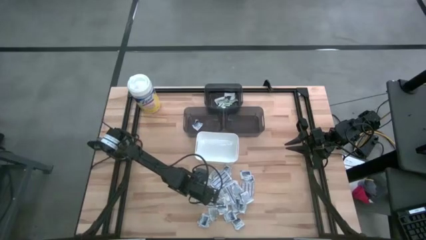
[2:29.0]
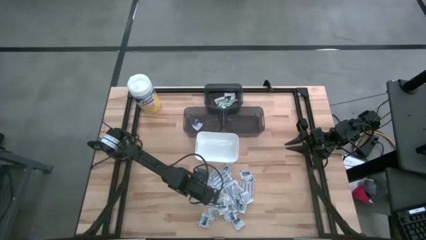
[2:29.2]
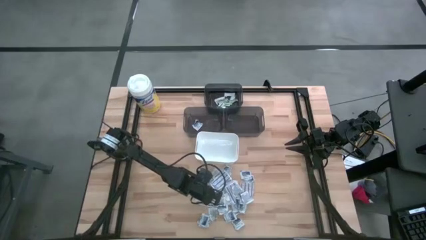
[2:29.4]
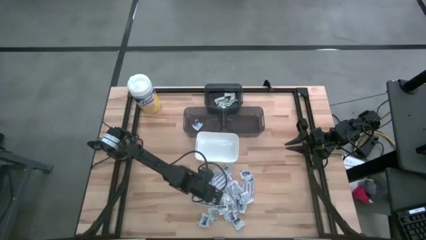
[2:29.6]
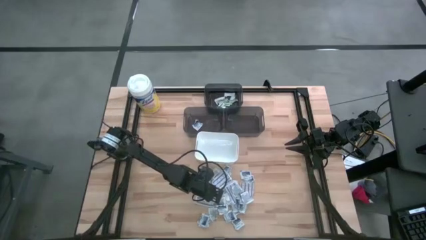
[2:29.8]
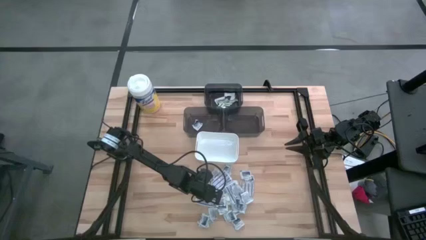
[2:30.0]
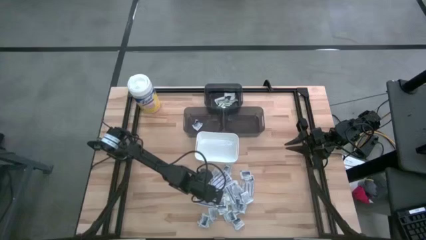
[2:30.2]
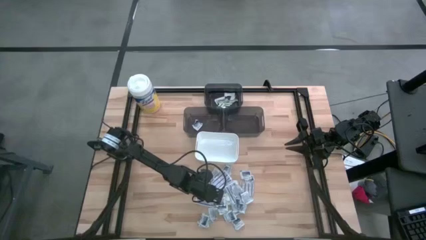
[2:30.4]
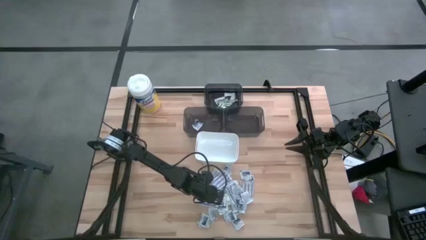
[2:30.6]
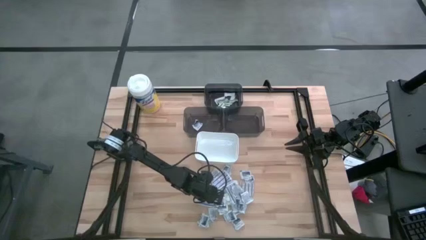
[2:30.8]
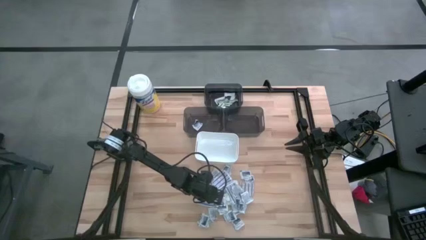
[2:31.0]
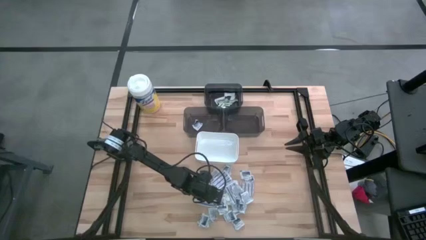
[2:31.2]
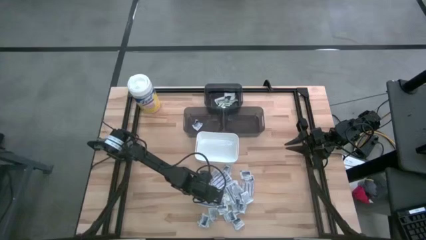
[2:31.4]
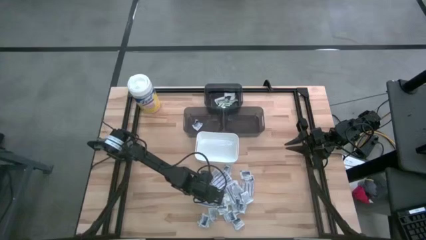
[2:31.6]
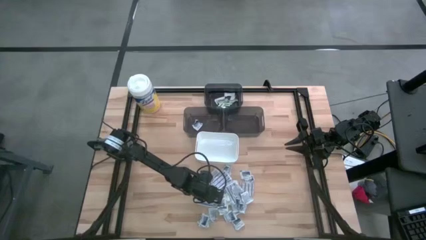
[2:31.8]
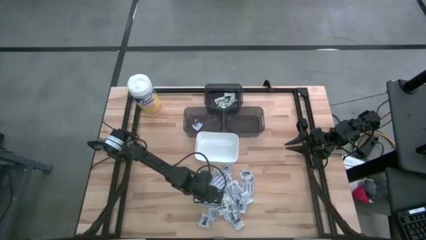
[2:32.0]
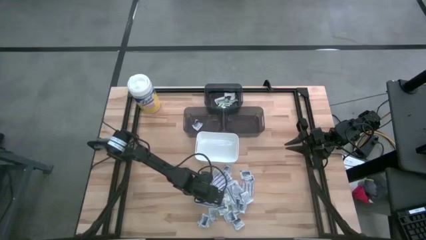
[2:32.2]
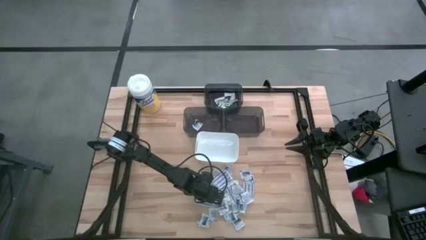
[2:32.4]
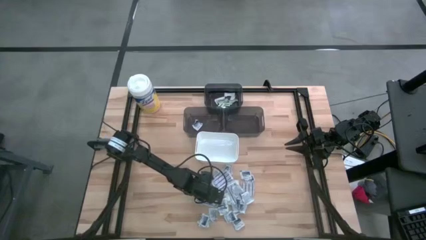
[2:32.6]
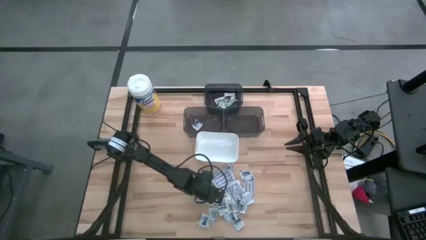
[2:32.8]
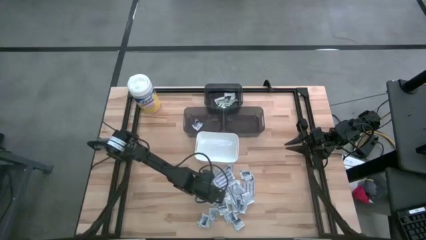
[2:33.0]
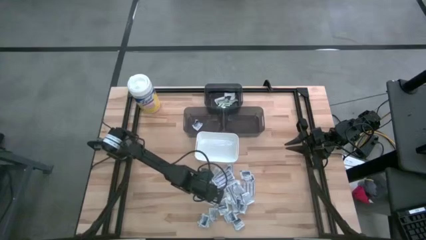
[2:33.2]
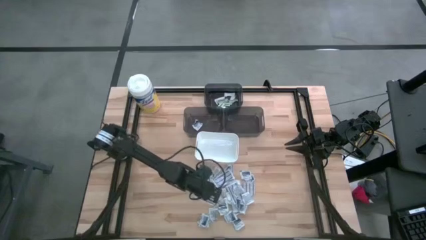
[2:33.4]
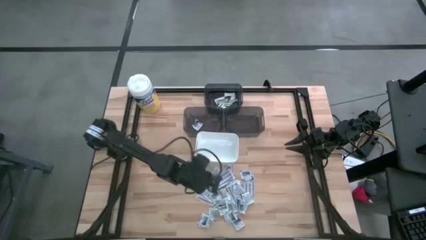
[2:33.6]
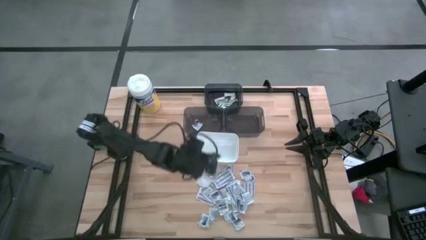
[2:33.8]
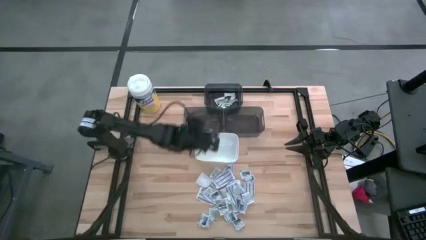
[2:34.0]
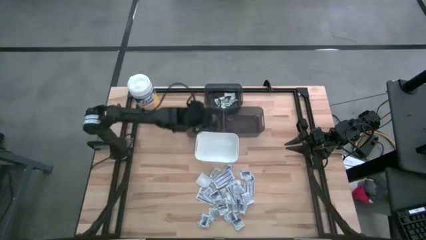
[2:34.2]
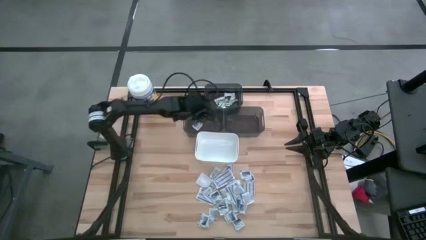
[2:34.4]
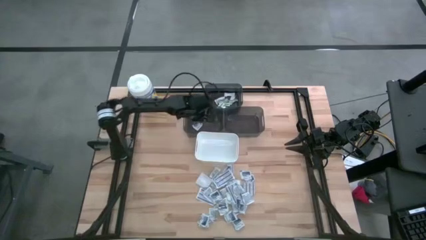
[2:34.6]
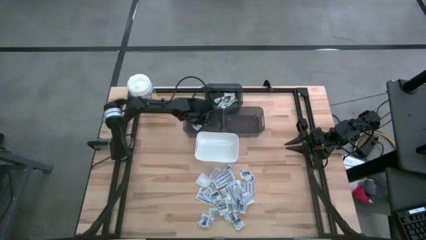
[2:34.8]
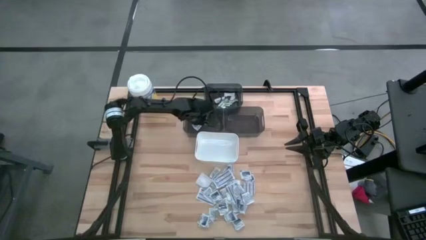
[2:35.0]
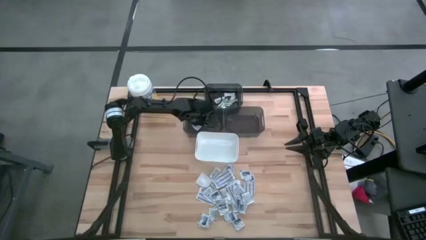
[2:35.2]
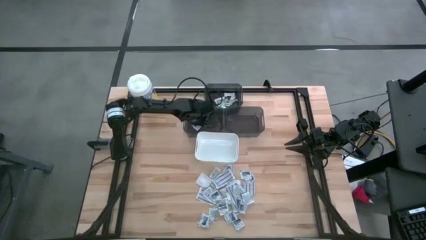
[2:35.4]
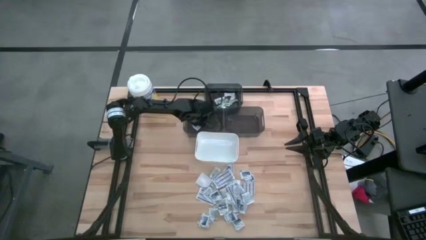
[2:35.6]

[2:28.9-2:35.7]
Task: Pick & Place First Aid Supplies
Put the alcohol pad into the left black bin

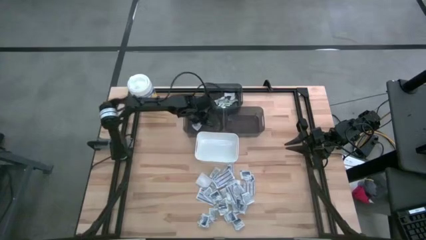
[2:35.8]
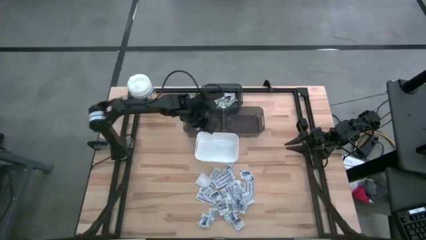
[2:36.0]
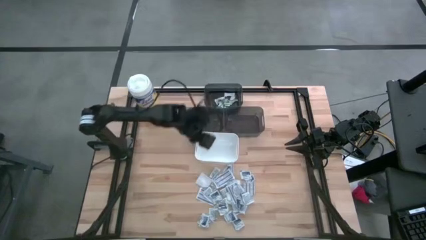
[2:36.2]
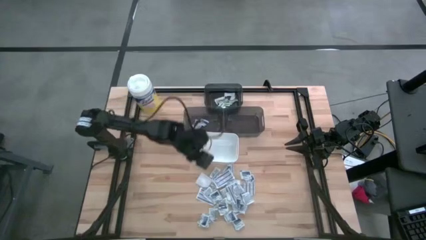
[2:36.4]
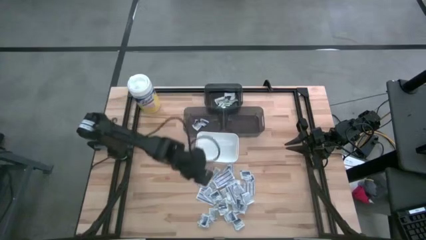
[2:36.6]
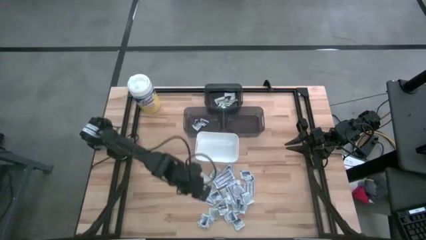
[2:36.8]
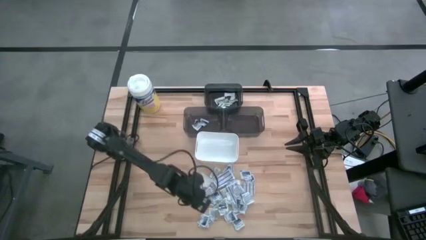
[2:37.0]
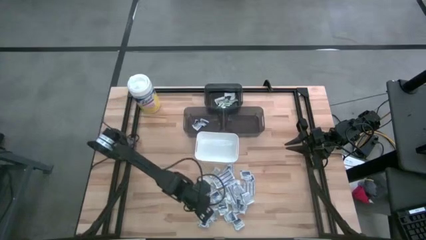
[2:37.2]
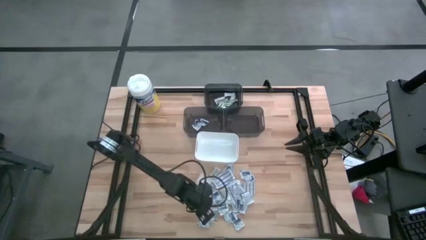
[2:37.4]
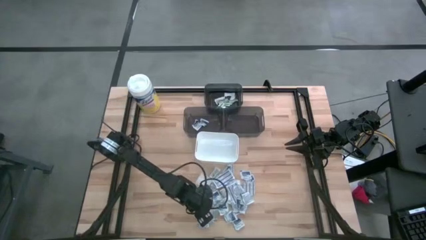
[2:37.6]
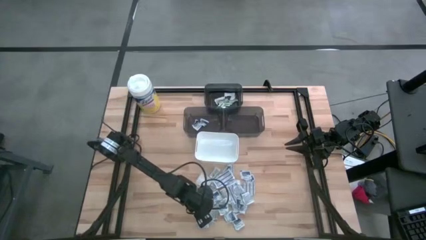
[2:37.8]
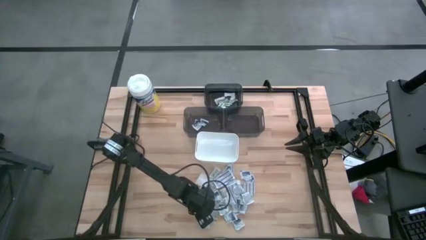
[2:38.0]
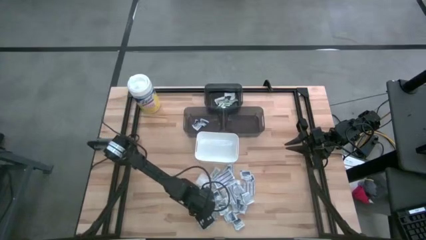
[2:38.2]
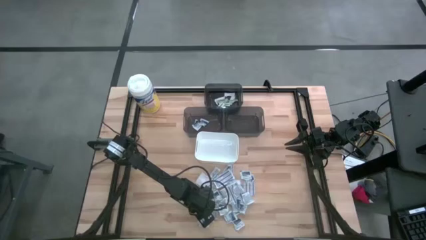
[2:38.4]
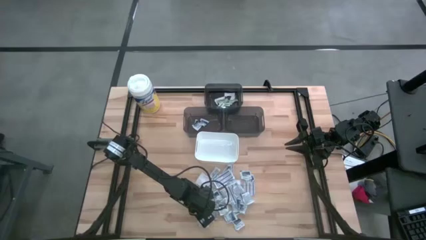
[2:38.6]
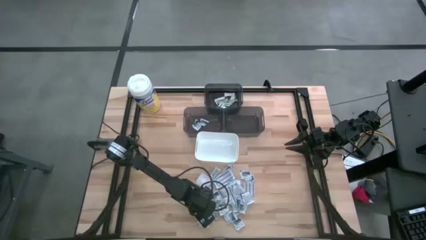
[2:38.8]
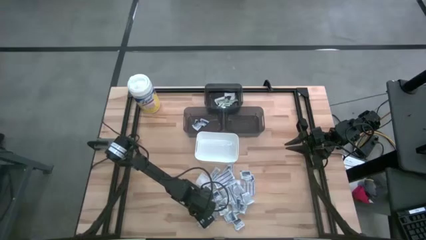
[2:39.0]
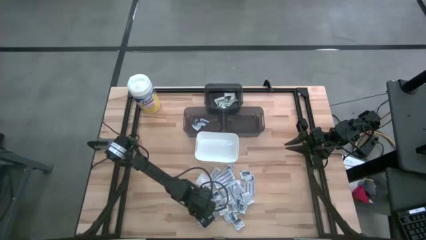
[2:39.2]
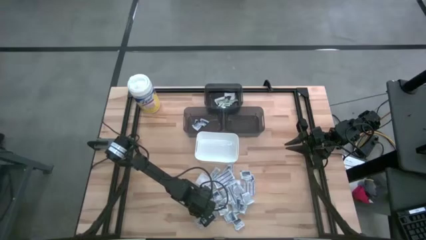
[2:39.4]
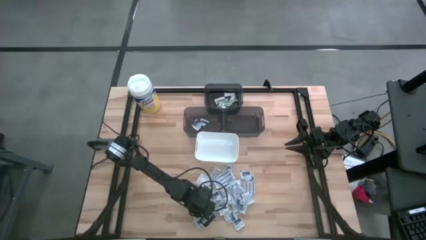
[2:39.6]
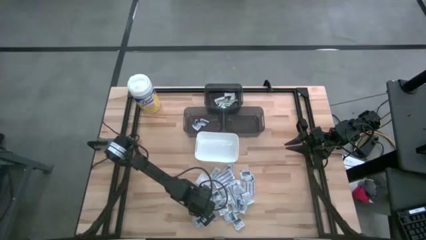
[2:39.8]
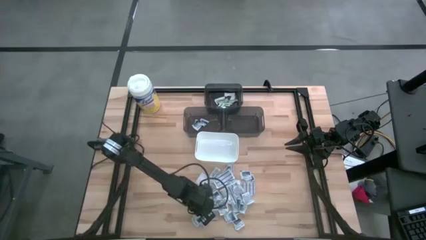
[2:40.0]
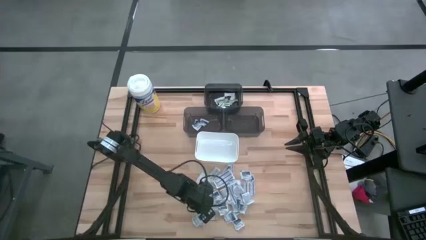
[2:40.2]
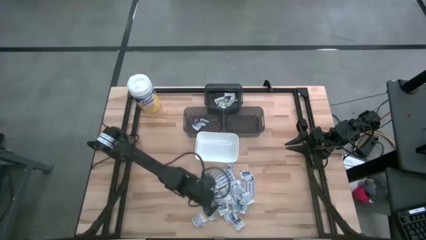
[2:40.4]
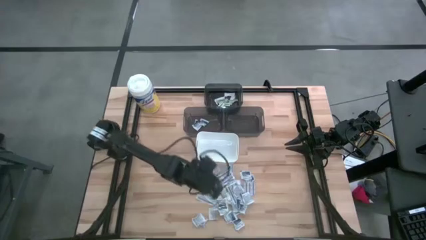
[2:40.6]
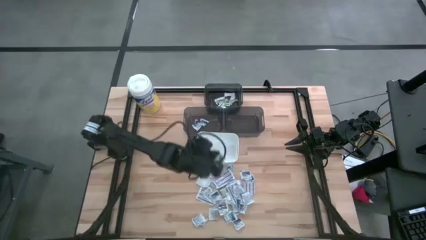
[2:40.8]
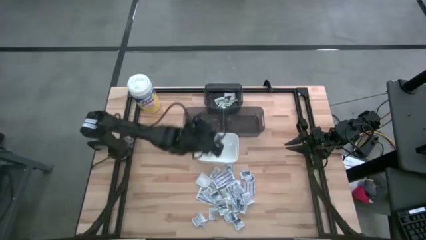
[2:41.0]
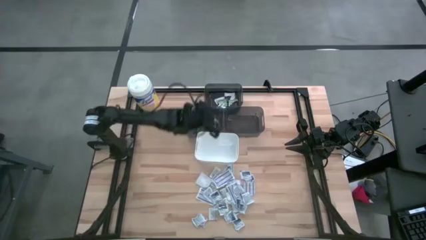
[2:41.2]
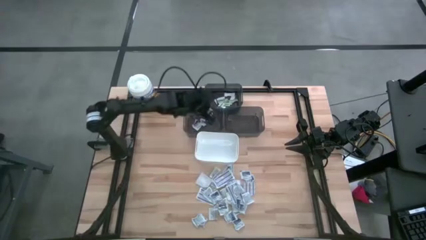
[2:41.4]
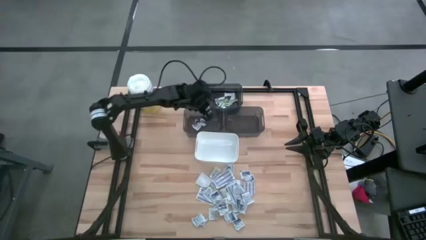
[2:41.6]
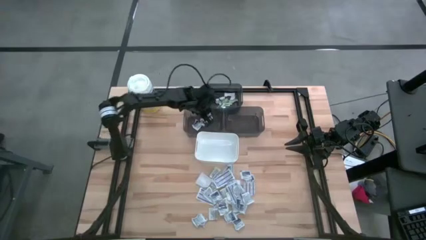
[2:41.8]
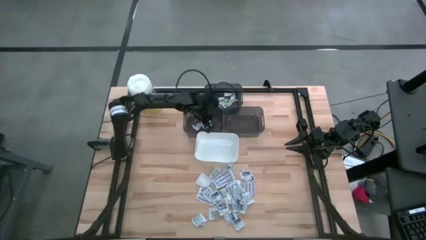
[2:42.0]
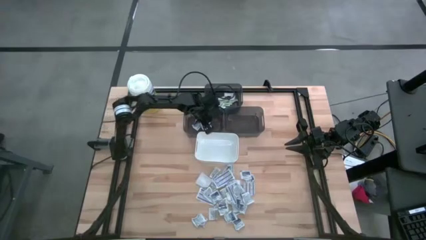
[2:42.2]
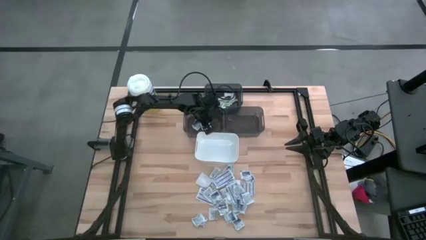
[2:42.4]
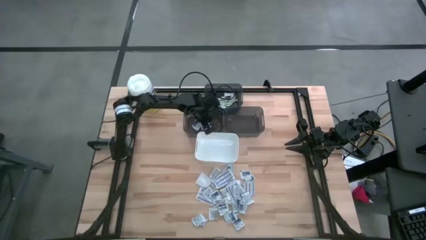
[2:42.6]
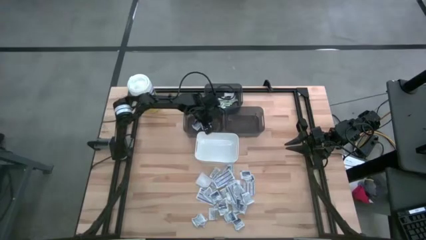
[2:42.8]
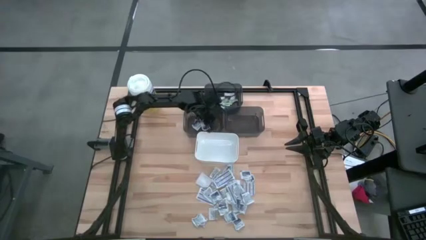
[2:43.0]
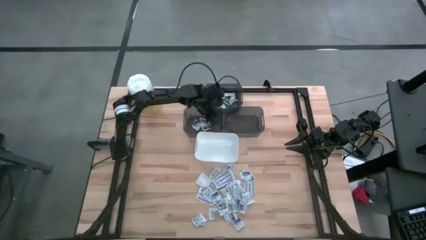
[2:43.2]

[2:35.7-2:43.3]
Put the alcohol pad into the left black bin

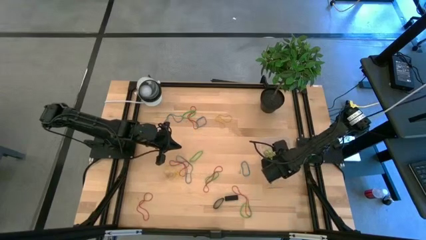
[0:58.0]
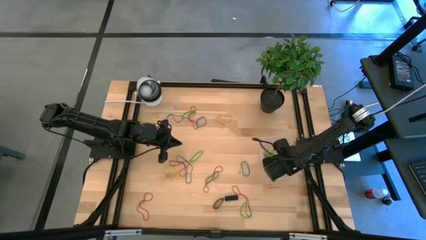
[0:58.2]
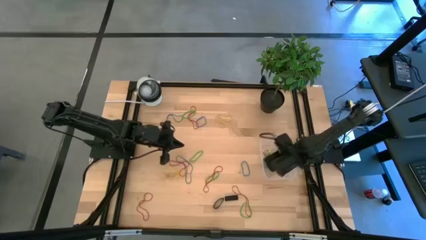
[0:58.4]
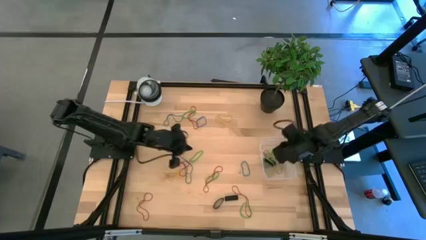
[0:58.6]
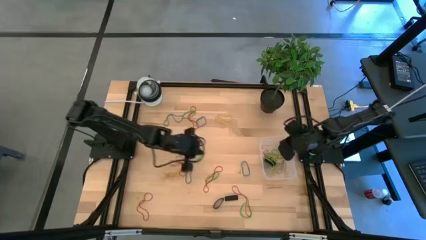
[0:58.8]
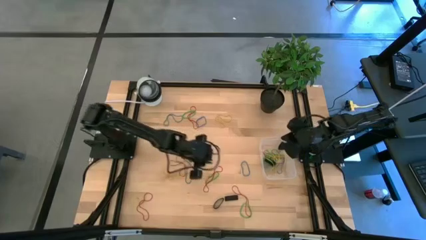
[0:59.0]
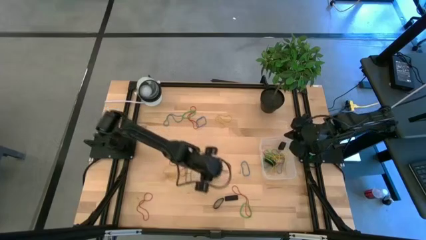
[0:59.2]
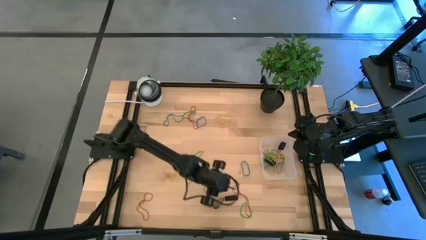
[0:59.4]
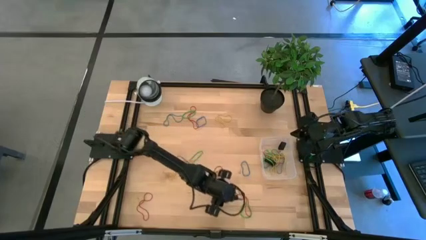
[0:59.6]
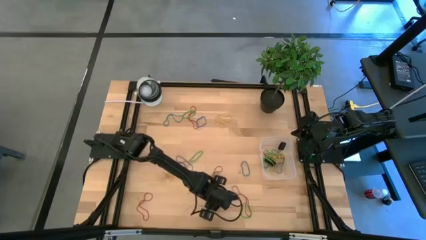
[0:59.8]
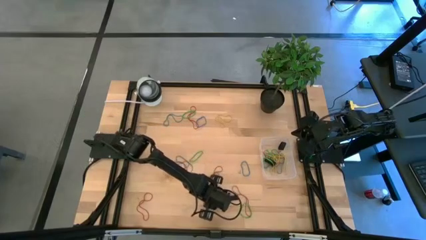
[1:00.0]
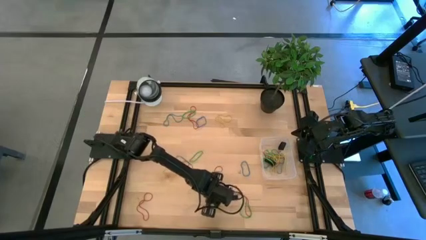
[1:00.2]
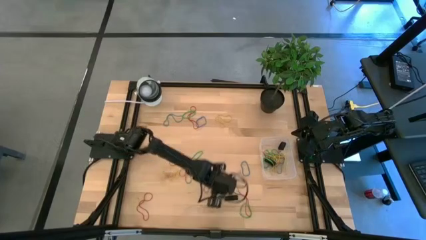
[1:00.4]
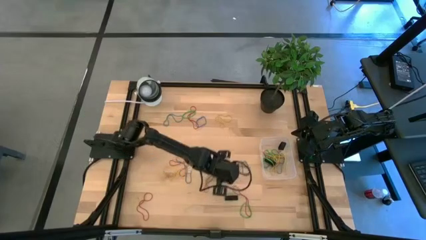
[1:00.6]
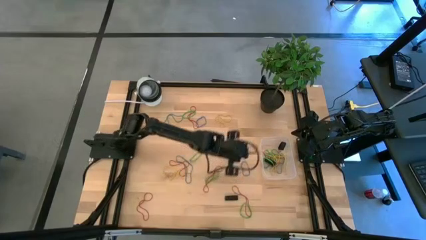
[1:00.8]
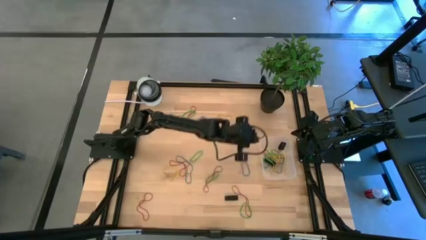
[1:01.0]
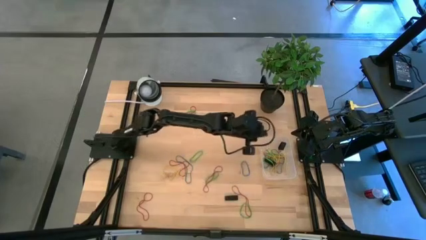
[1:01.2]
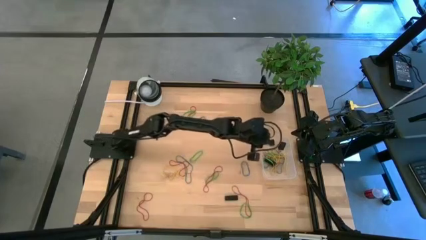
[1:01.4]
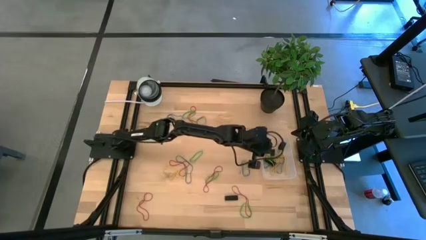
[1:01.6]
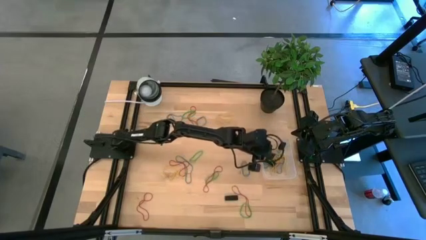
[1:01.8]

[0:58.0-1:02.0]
Task: Pick and place rubber bands into bin
Put the black rubber band into the transparent bin
